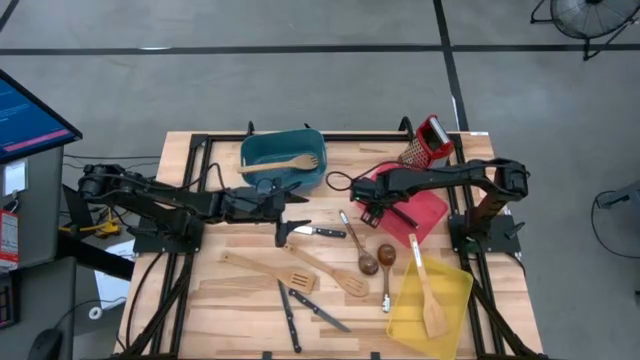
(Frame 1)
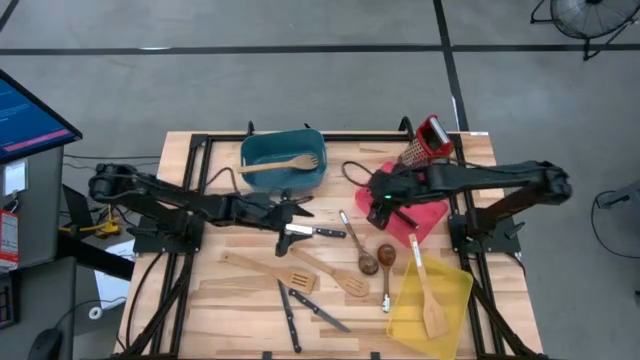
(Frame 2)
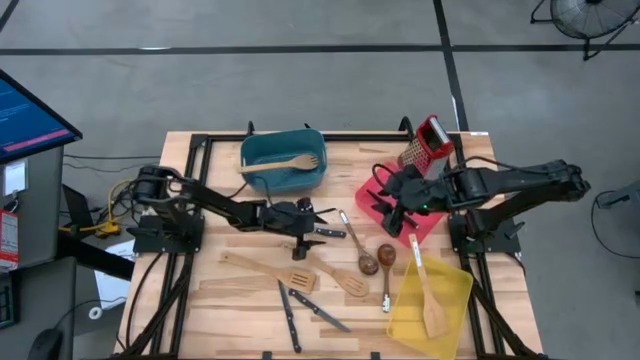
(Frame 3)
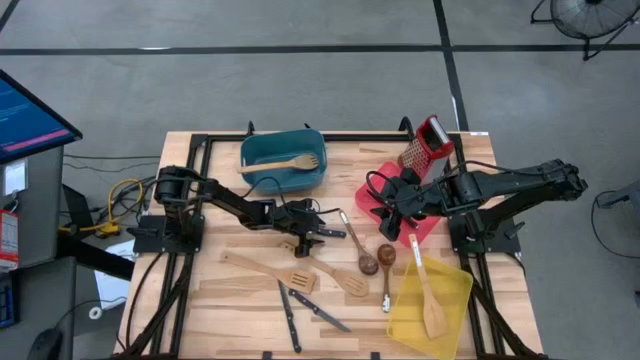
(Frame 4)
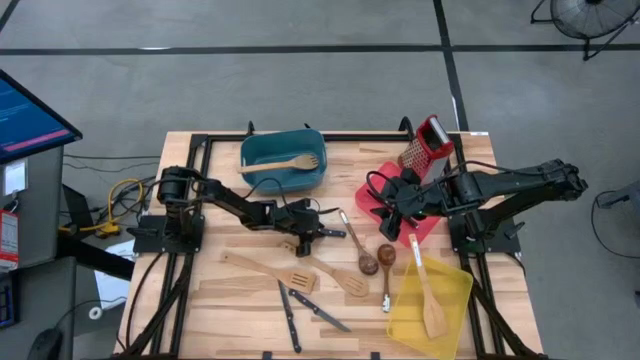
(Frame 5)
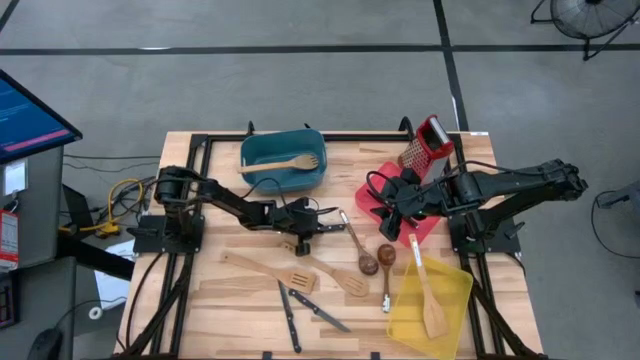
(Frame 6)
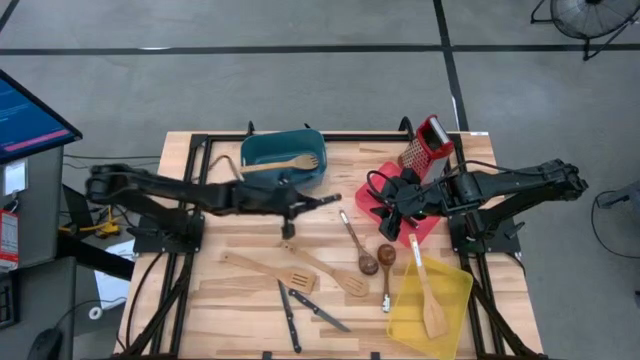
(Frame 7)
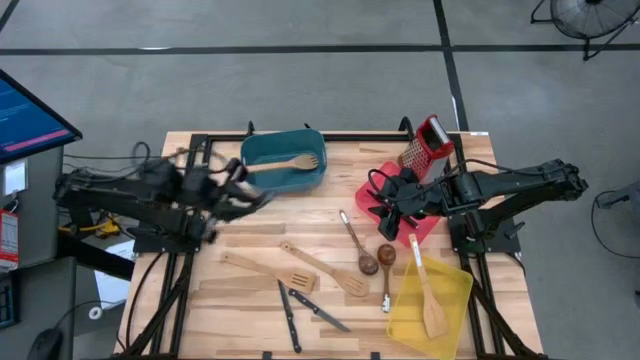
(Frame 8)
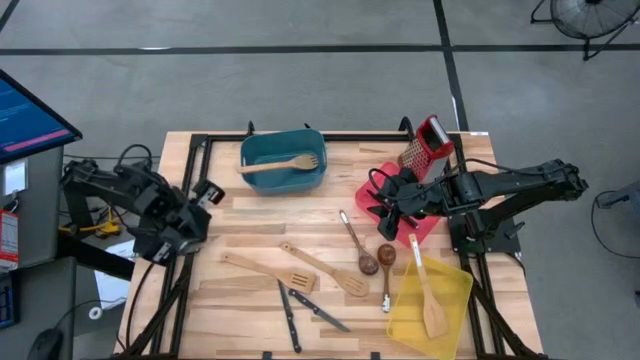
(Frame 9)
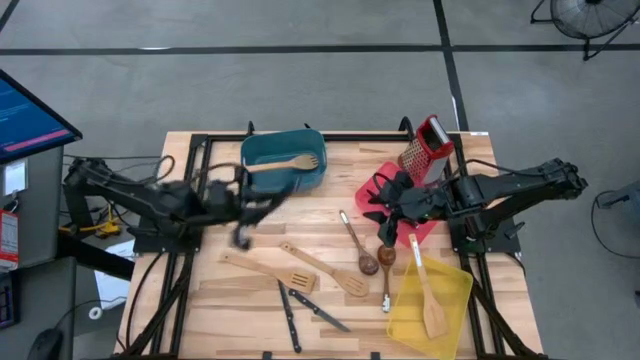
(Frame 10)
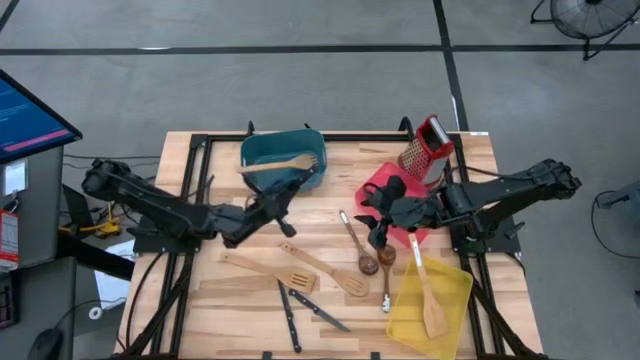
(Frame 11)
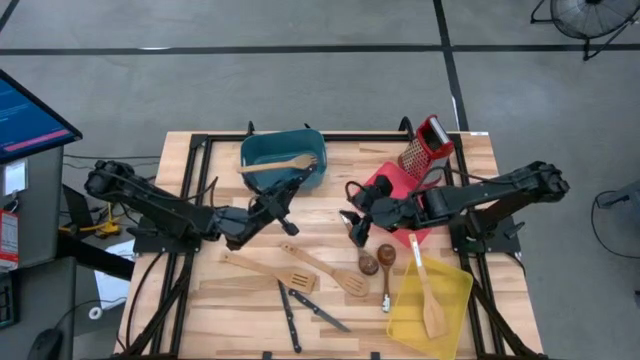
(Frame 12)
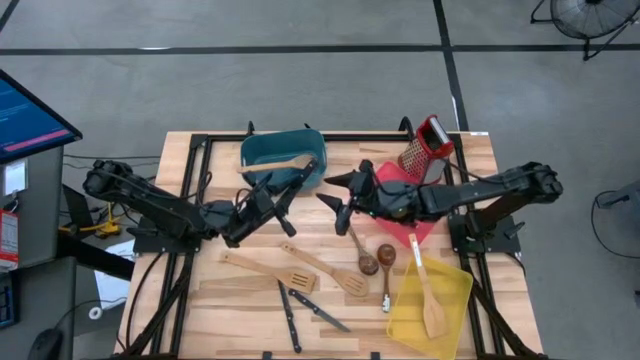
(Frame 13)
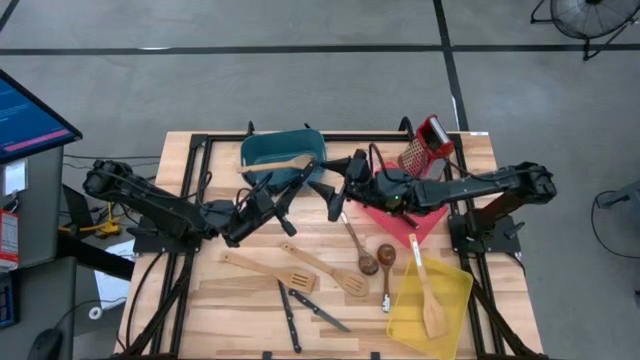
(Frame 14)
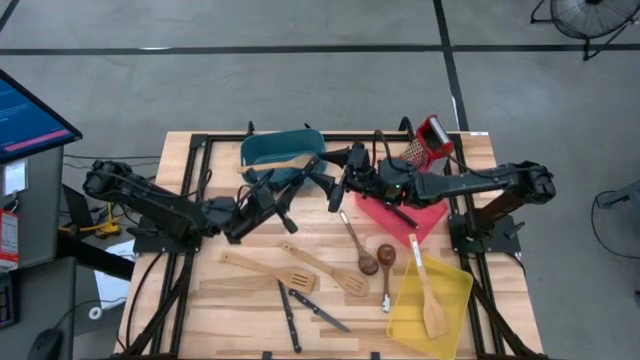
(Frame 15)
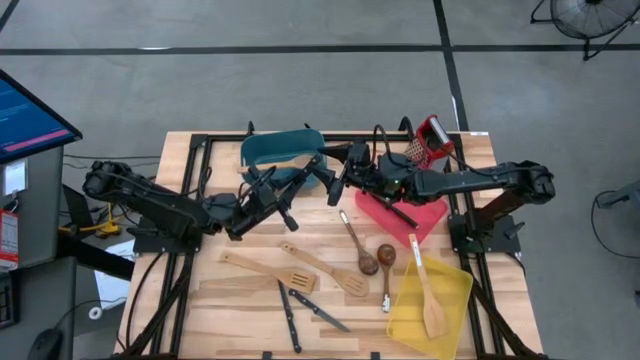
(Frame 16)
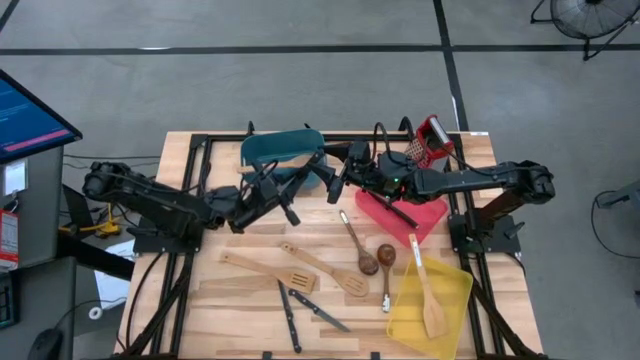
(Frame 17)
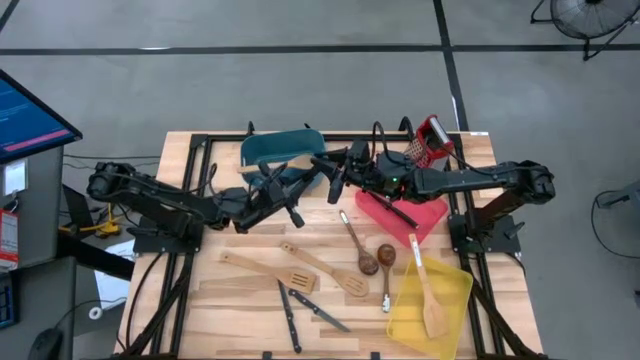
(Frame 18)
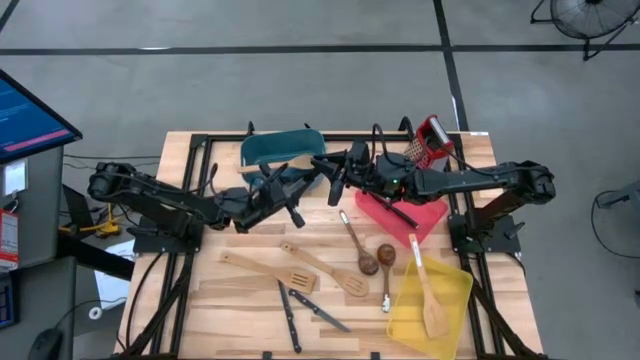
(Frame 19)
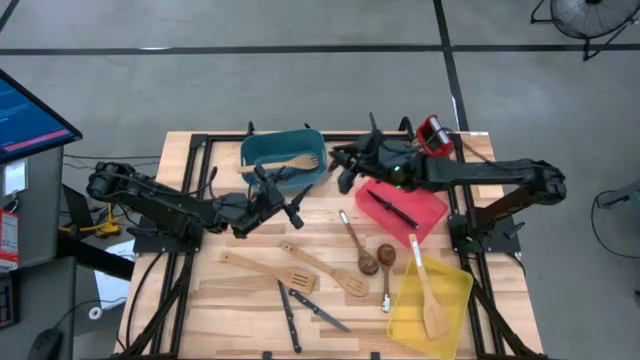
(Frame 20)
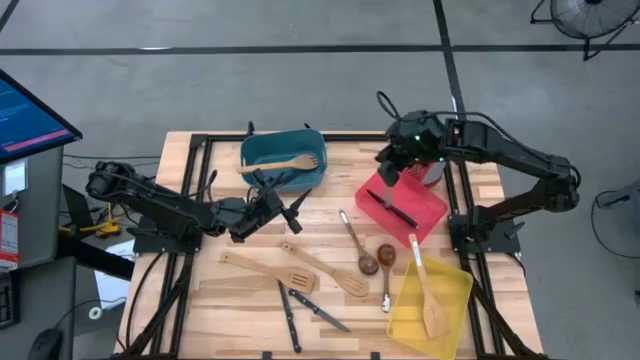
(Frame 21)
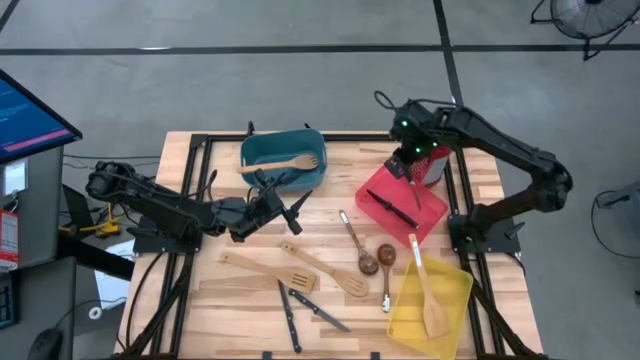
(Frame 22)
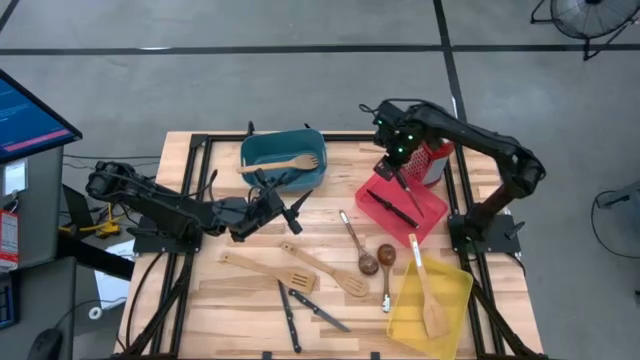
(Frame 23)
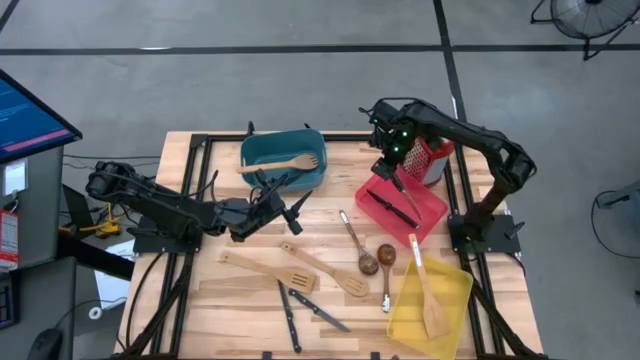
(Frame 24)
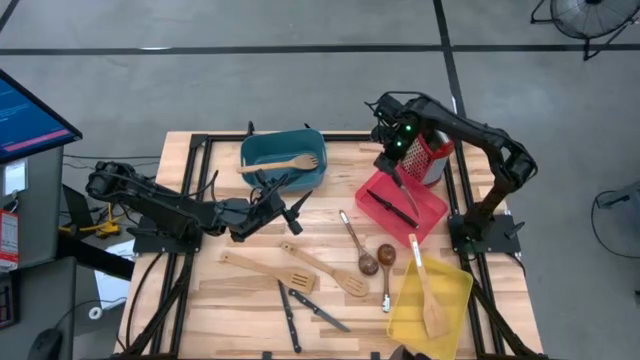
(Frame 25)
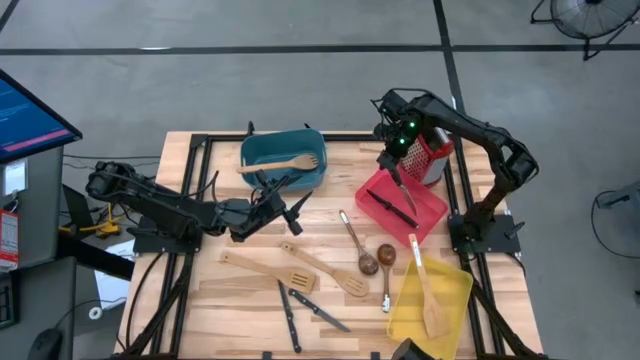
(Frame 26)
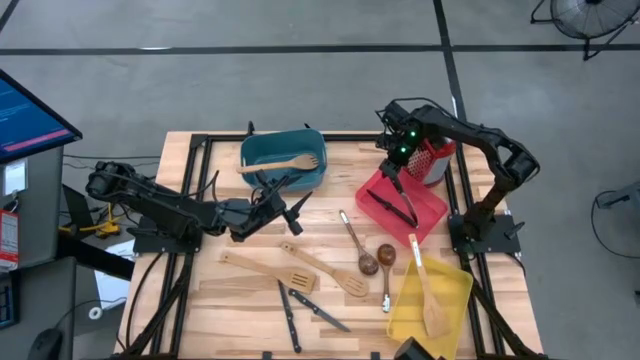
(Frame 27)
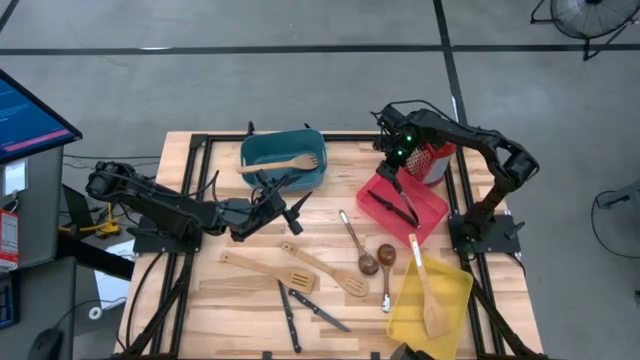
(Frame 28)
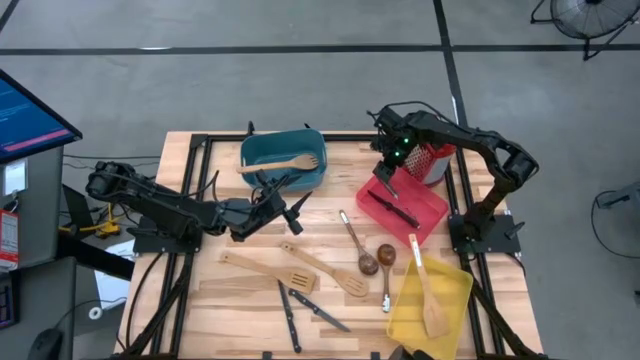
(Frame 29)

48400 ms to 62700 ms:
Task: Pick & Place Kitchen Items
Put the black kitchen knife into the red bin

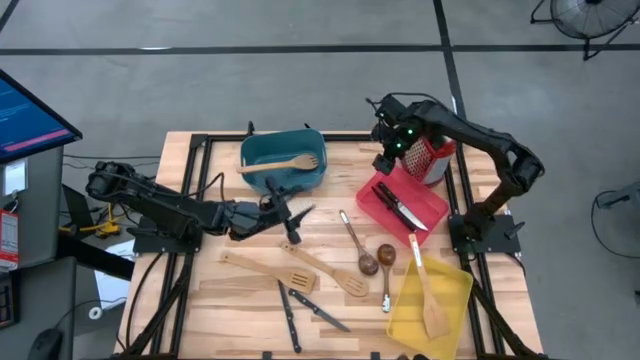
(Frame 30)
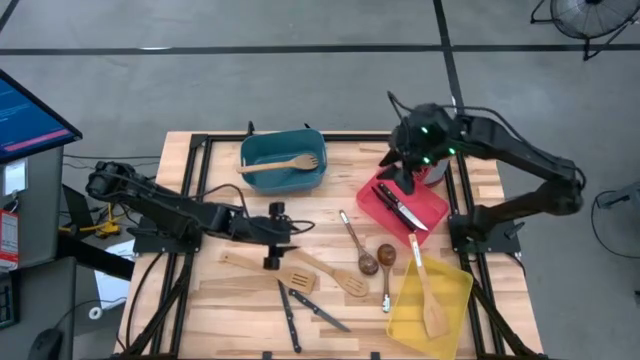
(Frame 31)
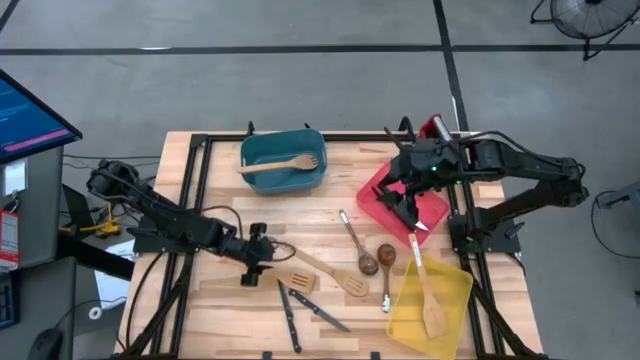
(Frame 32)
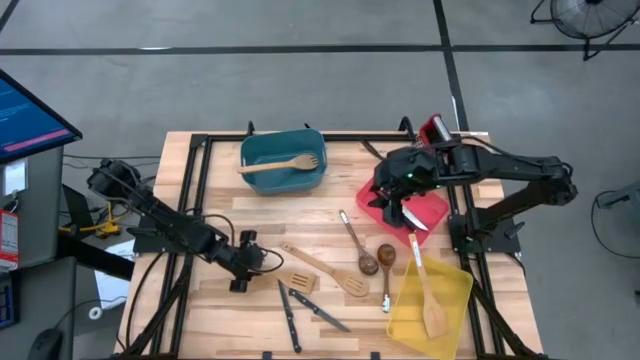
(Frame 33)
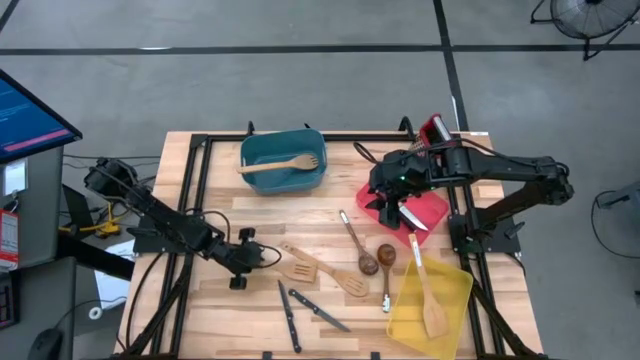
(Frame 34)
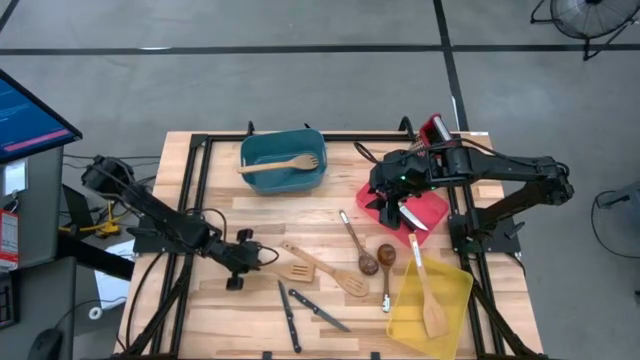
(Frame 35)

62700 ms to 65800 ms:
Put the wooden slotted spatula into the yellow bin

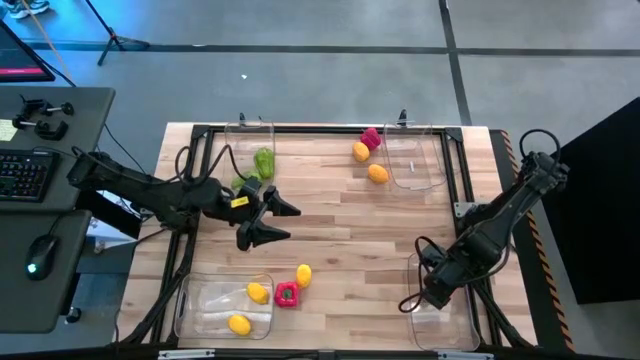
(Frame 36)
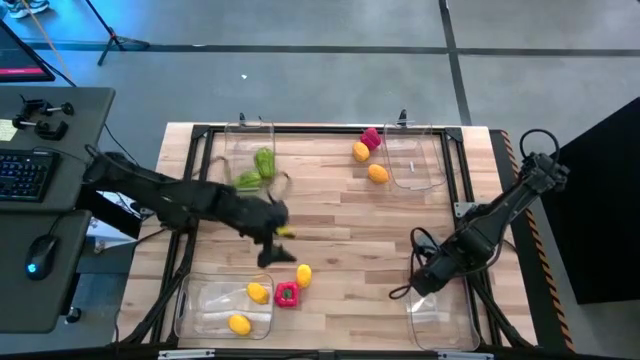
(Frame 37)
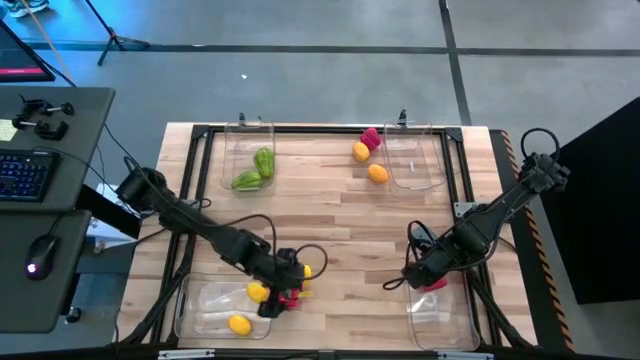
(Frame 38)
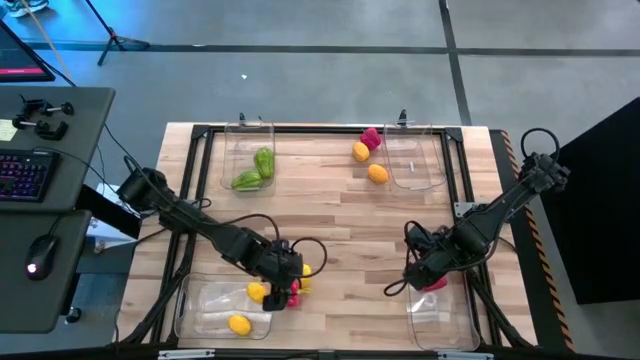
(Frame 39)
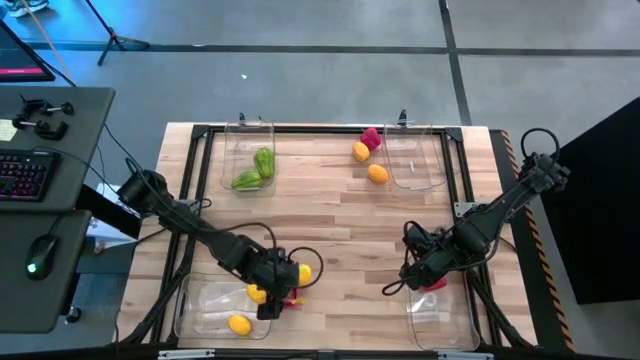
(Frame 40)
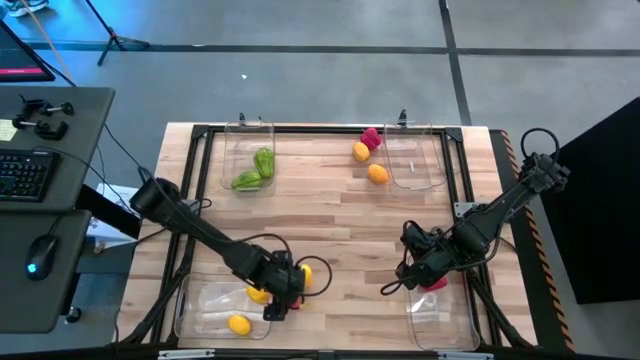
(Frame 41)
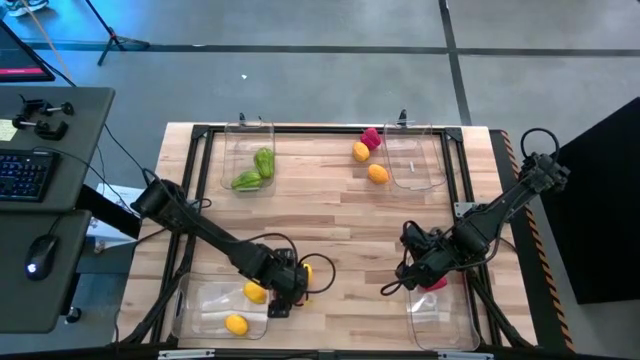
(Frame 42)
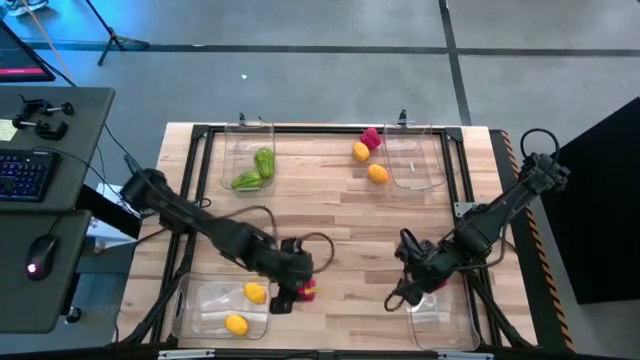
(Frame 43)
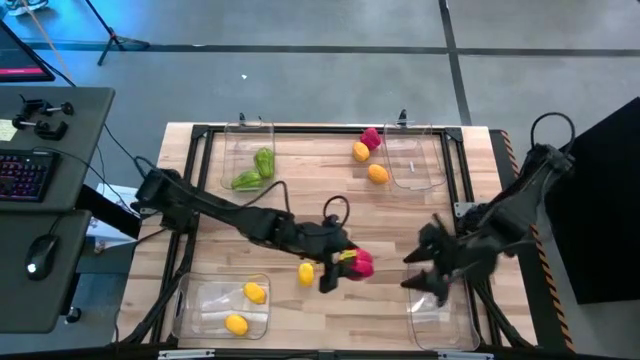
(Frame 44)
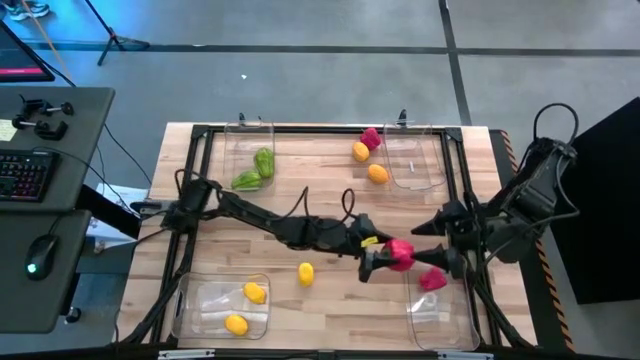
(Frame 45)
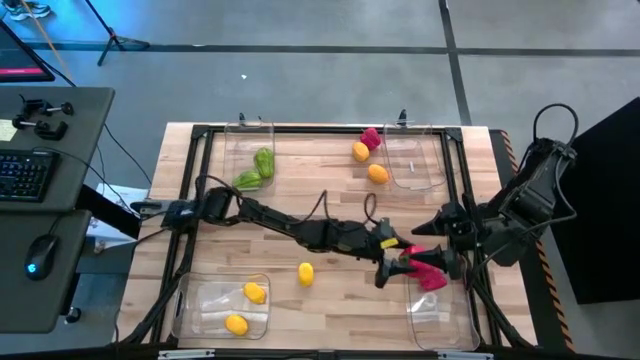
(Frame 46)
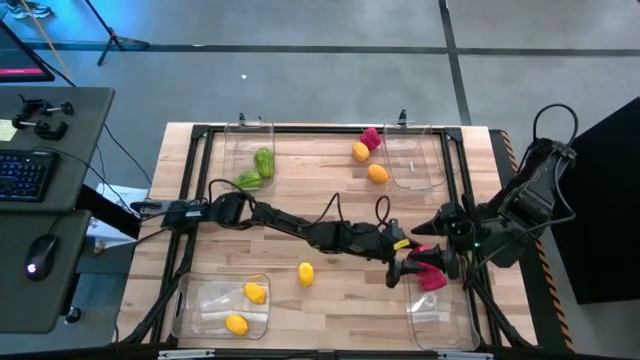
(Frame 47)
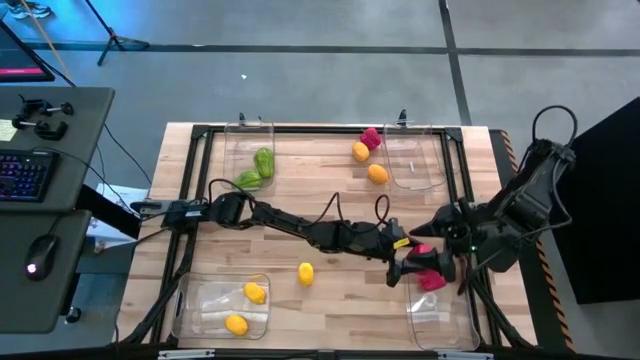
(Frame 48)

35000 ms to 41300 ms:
Task: Sort produce into baskets
Put the bell pepper into the bottom right transparent bin
